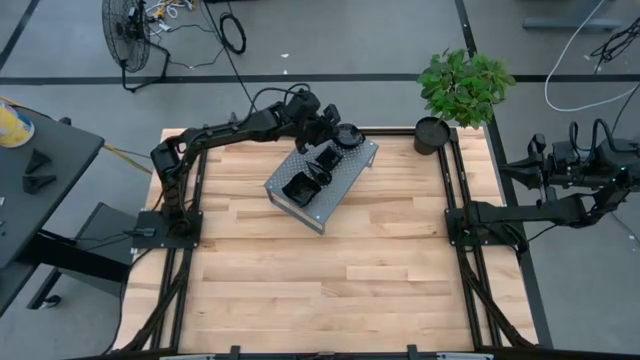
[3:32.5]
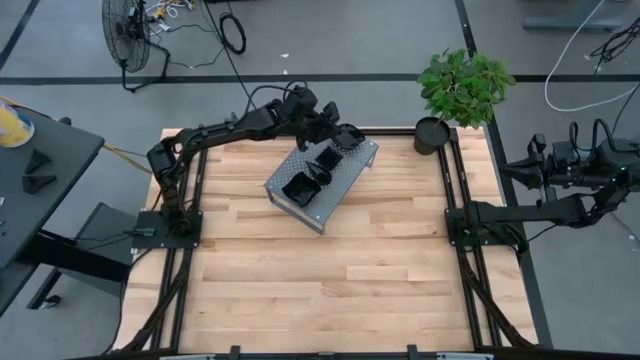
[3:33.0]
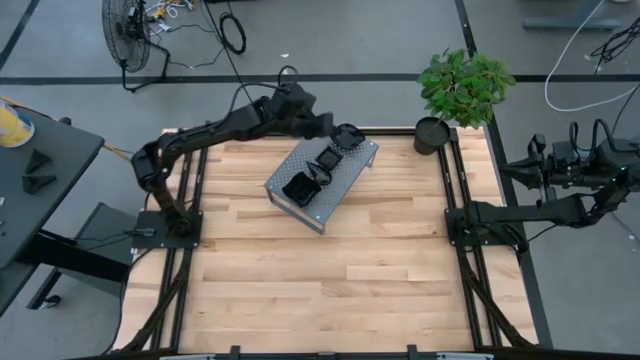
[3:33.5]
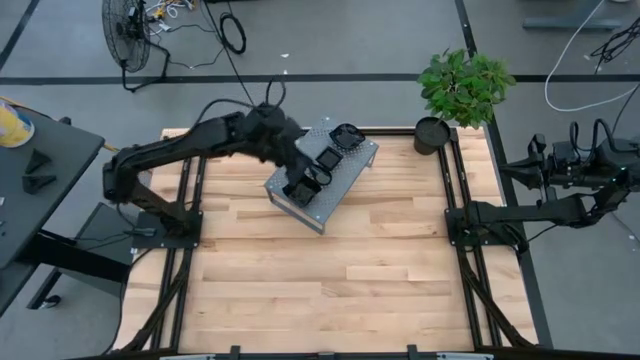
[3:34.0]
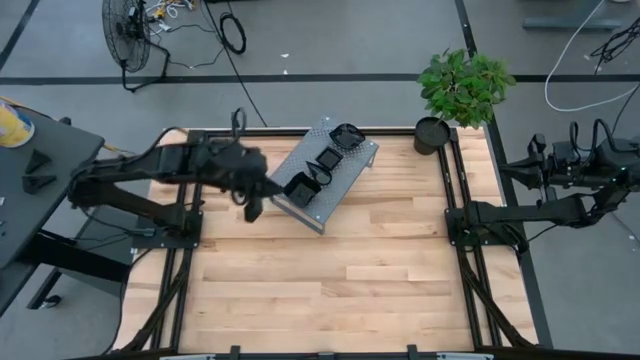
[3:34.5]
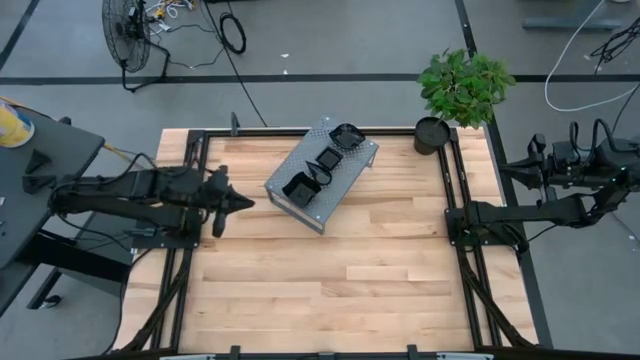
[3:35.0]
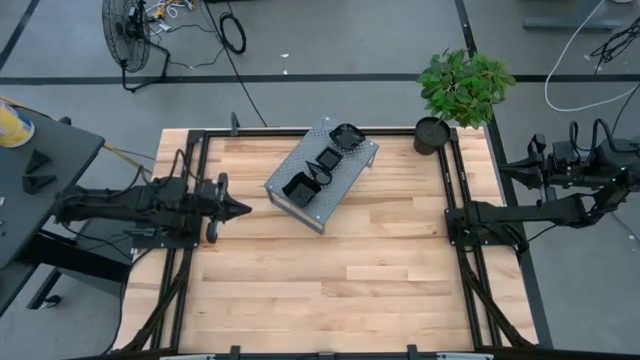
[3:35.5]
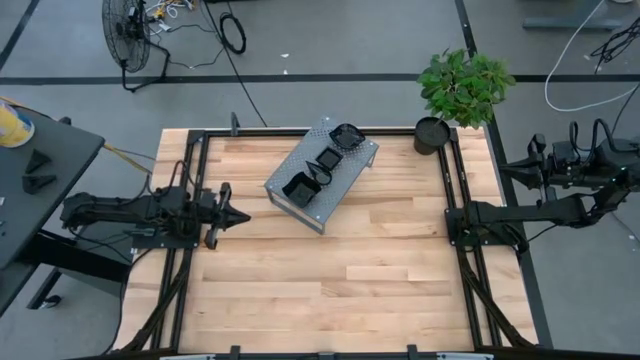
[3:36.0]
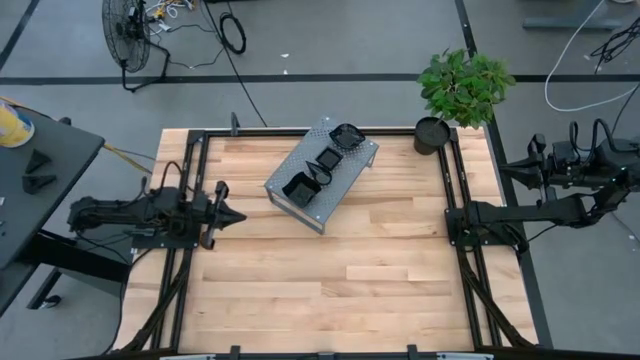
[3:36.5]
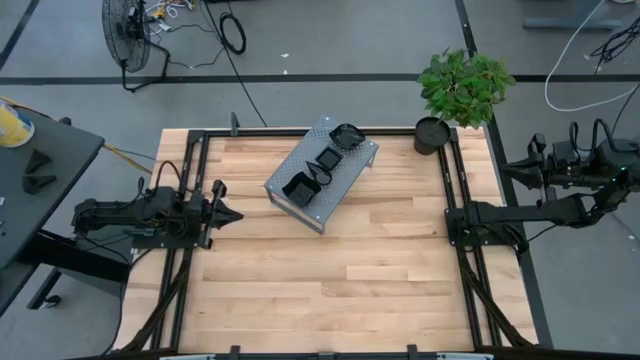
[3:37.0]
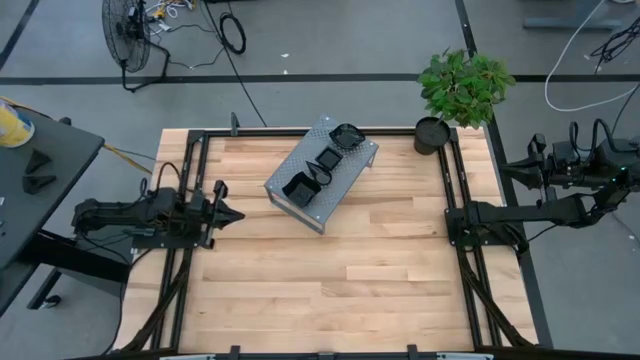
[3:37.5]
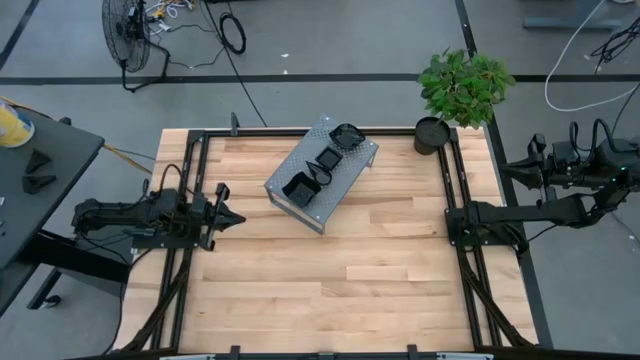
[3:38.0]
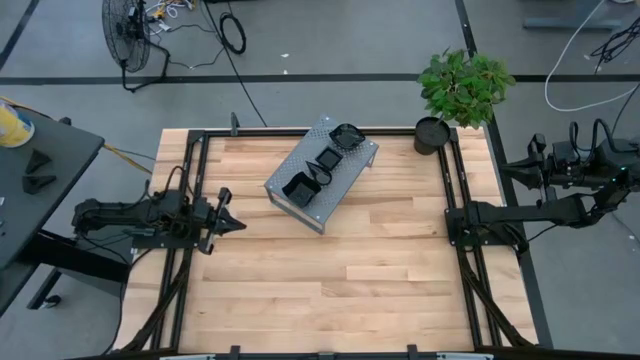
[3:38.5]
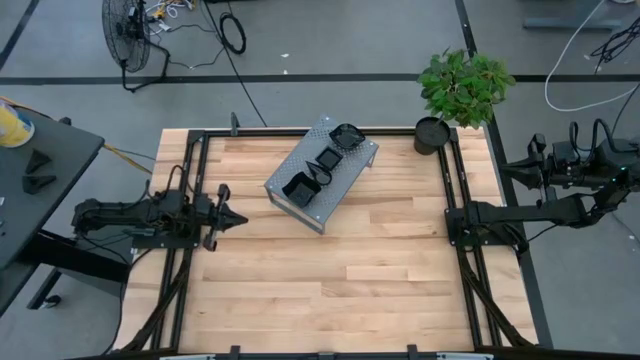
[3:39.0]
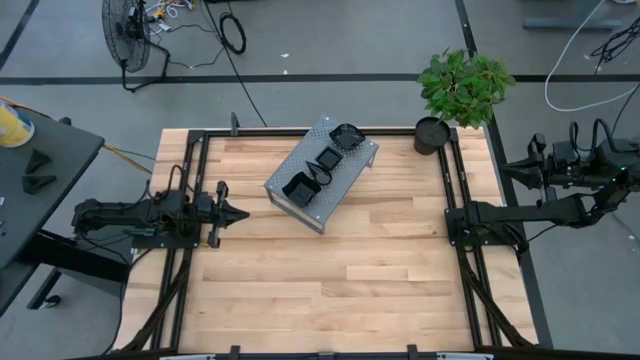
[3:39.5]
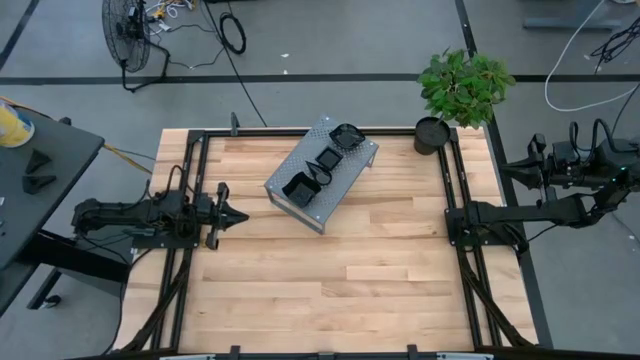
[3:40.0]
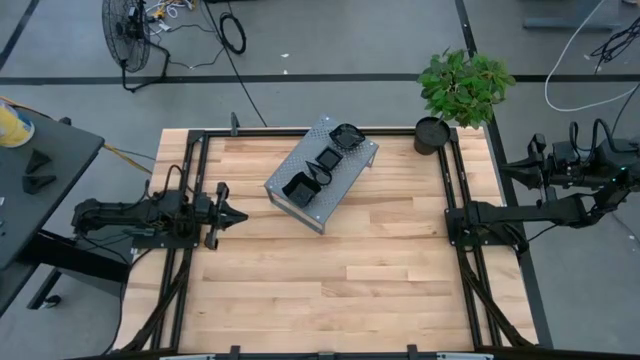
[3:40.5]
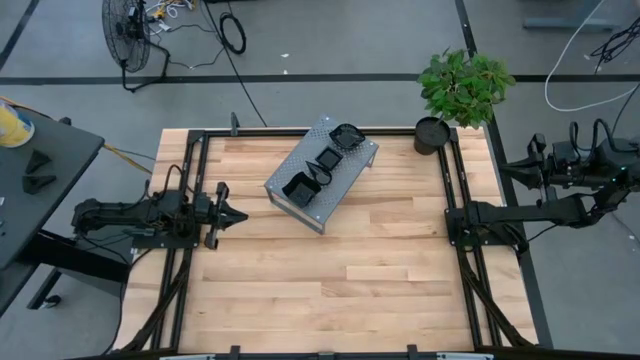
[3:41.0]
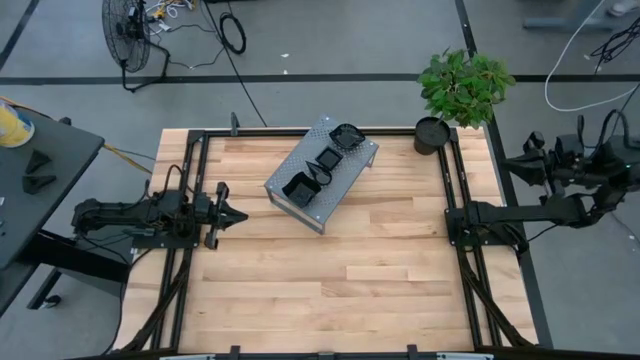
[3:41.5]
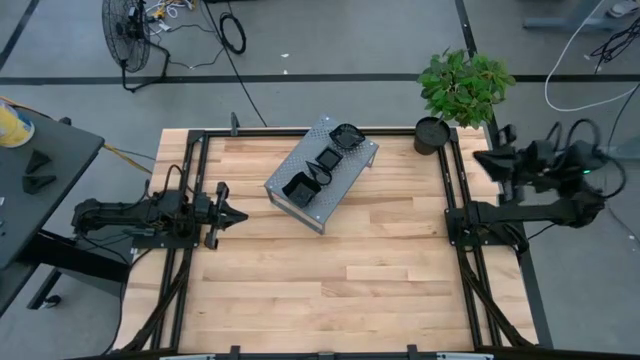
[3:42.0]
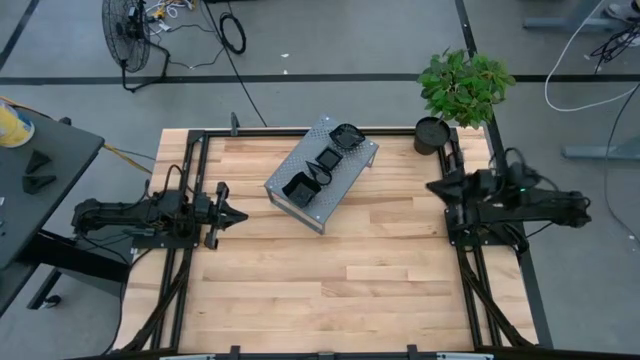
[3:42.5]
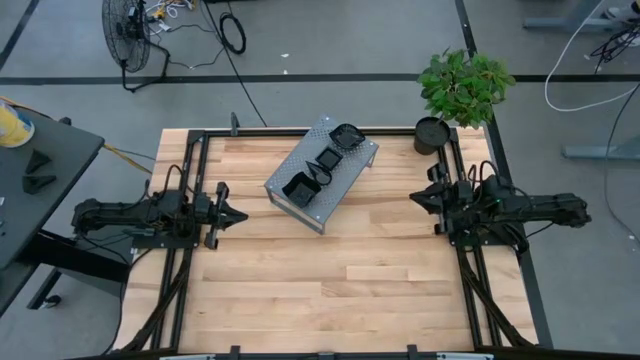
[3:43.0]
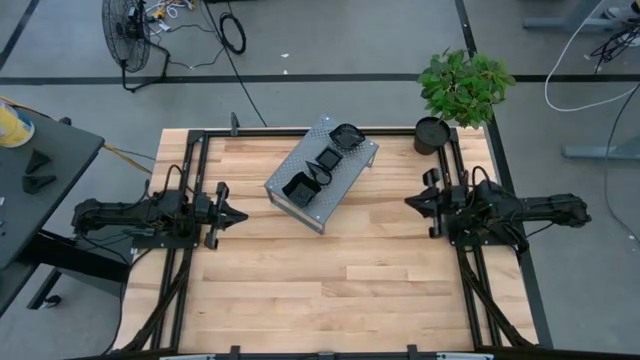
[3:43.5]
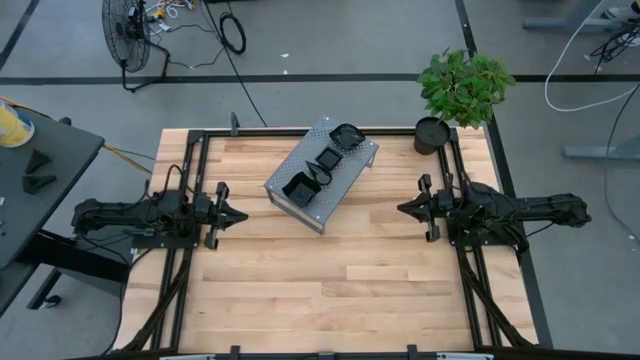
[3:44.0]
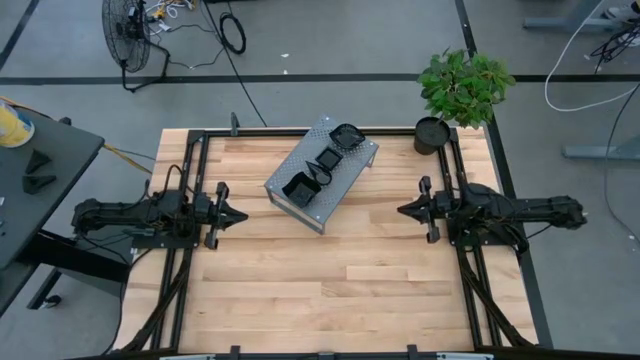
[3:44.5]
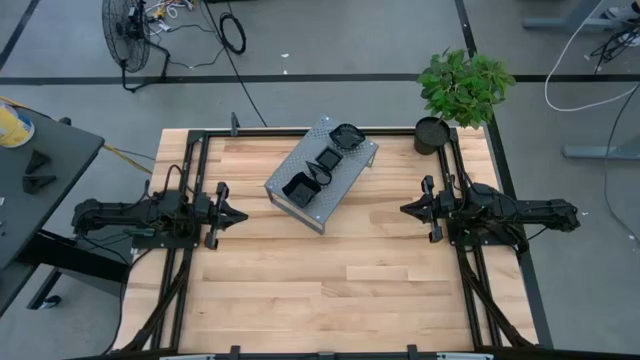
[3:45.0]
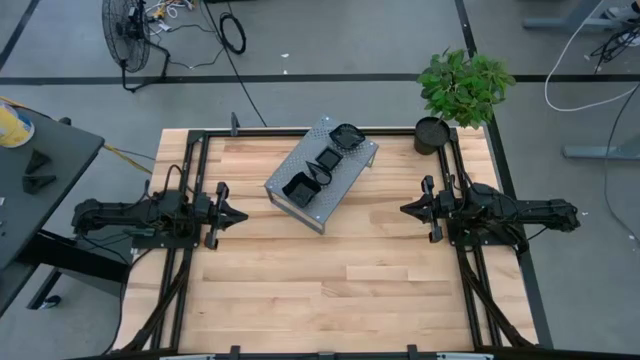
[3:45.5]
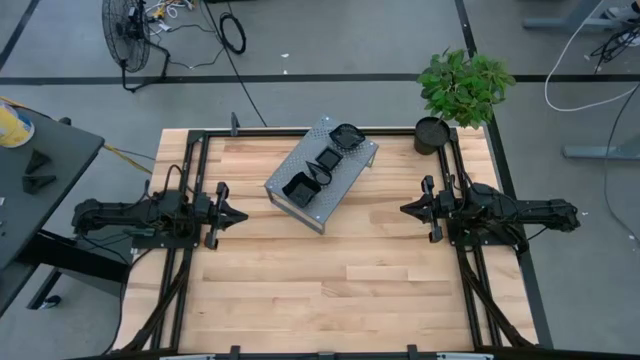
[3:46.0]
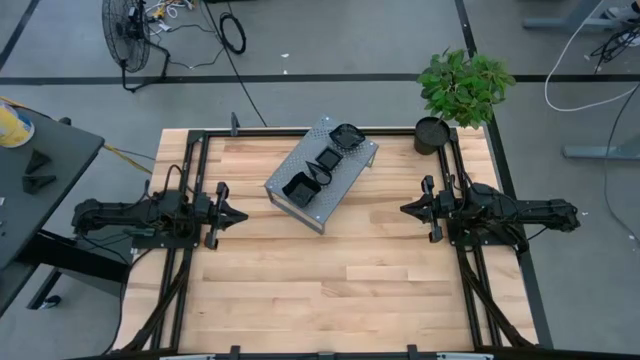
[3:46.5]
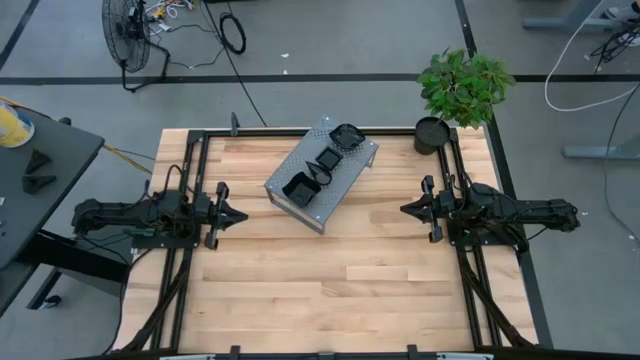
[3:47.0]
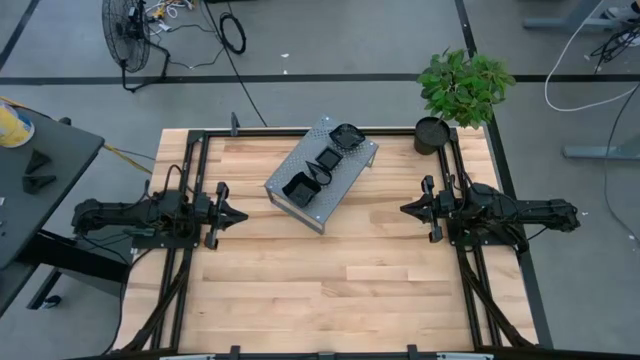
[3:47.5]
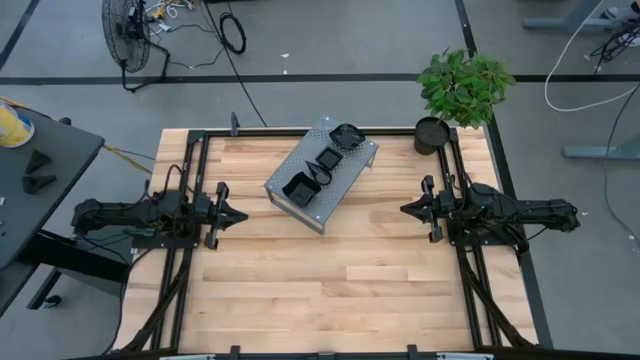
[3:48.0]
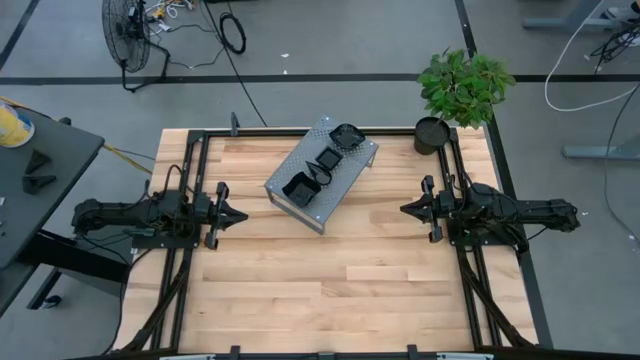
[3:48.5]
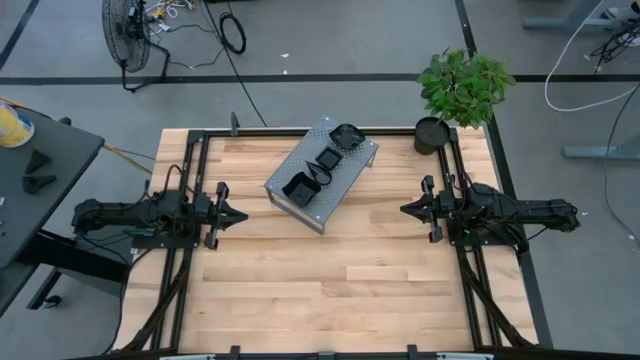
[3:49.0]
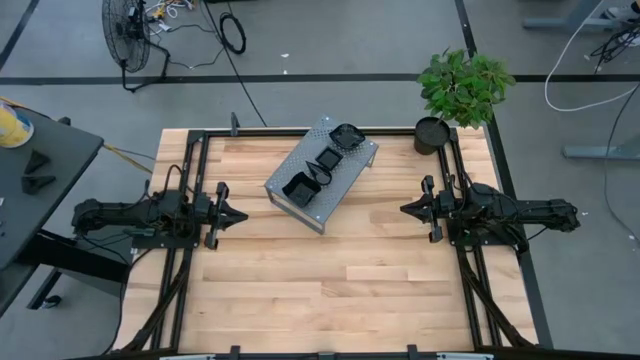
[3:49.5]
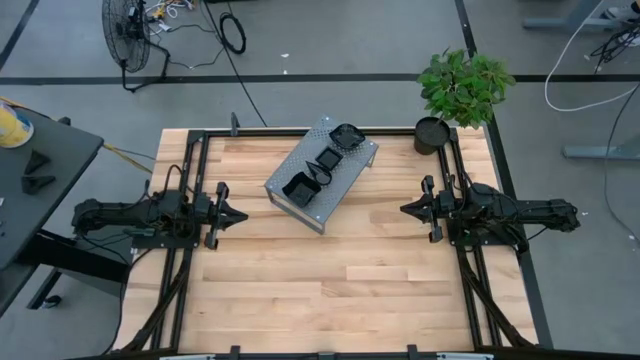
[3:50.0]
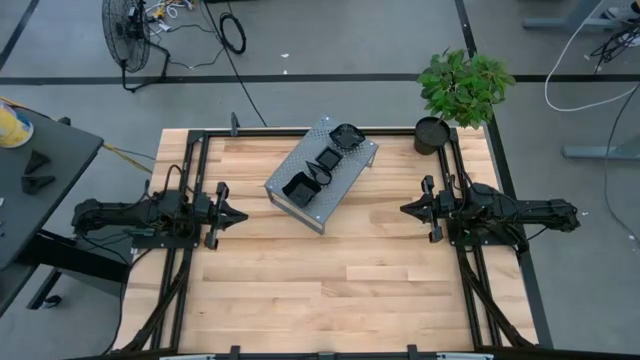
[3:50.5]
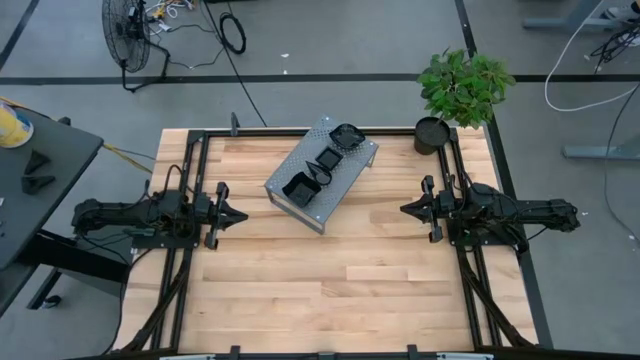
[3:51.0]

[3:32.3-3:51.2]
Task: Pick & Place Mini shaped plates
Return to Home Position

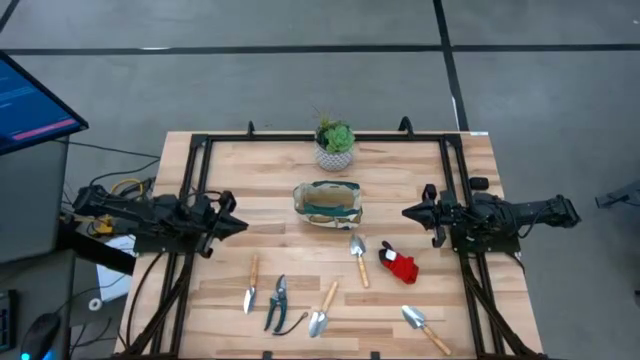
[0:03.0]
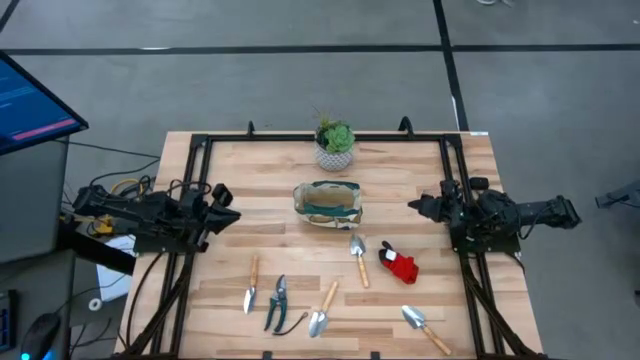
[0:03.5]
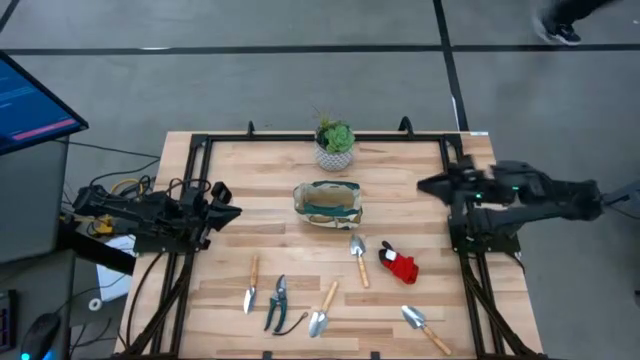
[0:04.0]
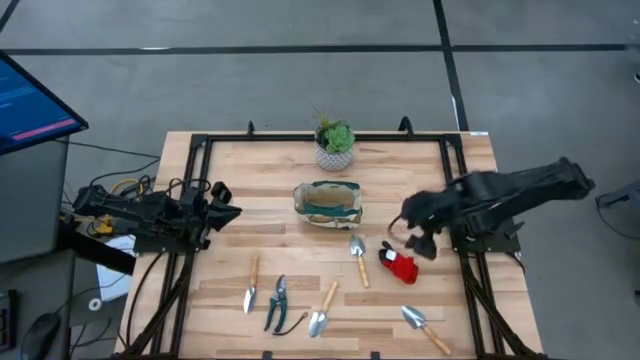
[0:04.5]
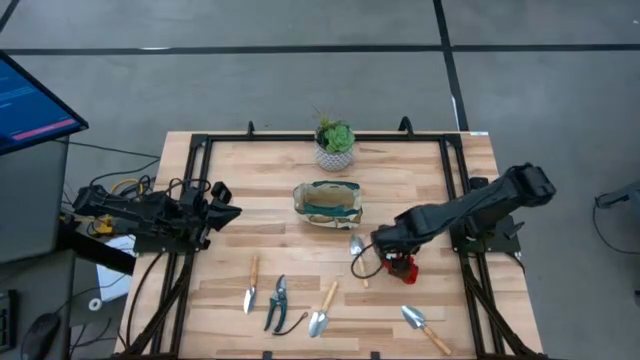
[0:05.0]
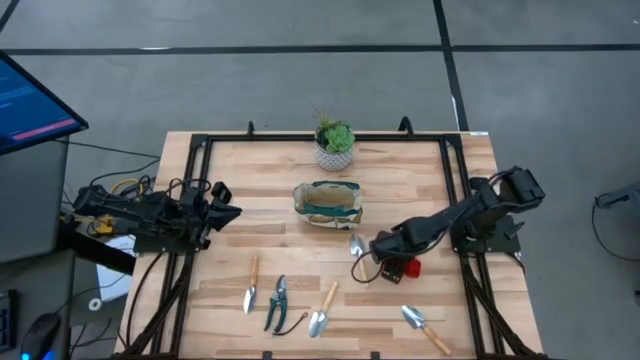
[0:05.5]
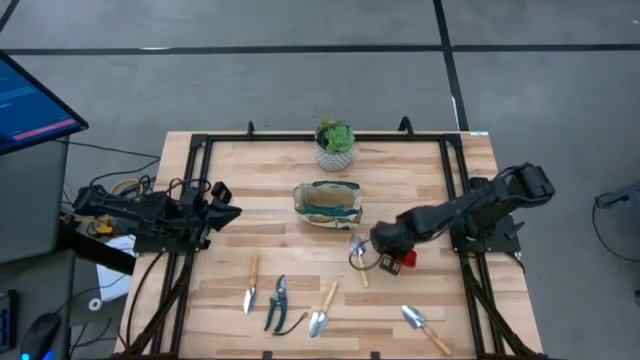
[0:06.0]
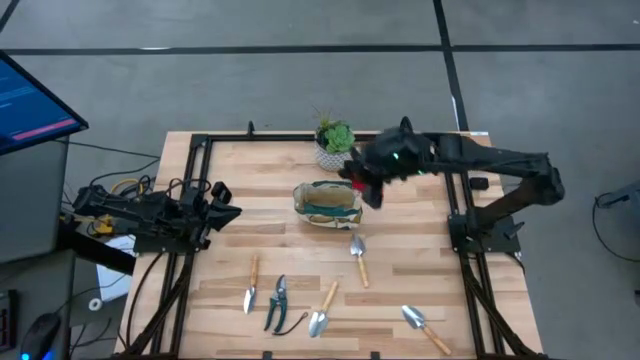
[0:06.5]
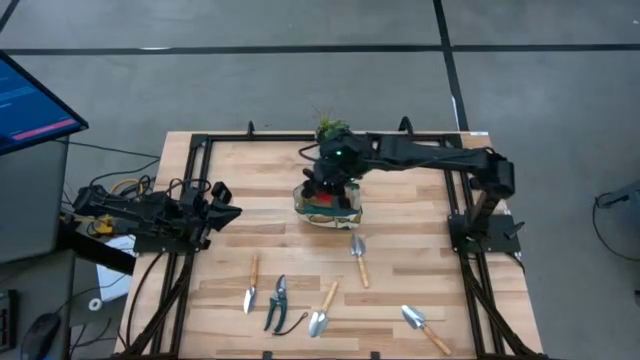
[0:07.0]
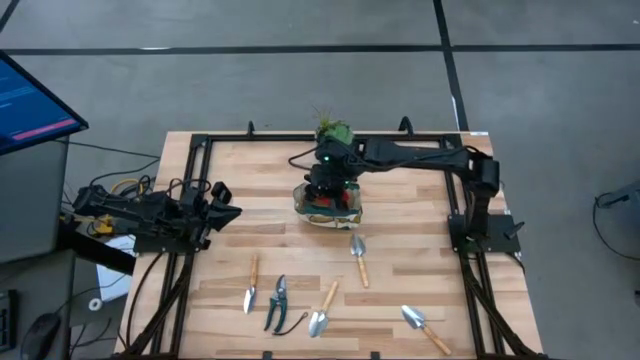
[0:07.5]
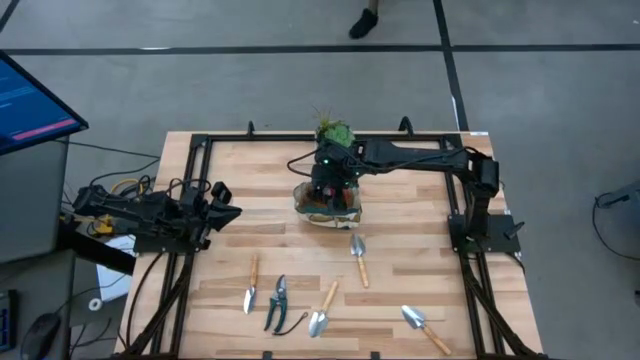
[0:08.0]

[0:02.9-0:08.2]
Task: Pick & Place Garden tools in Gardening bag
Put the gloves into the gardening bag
